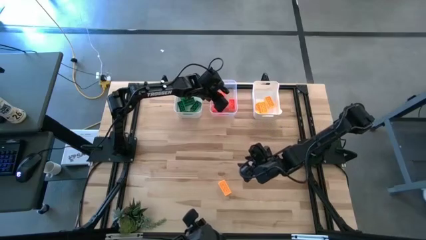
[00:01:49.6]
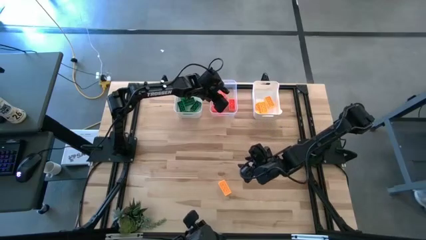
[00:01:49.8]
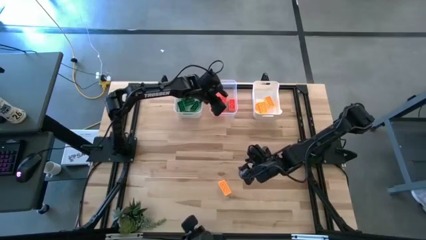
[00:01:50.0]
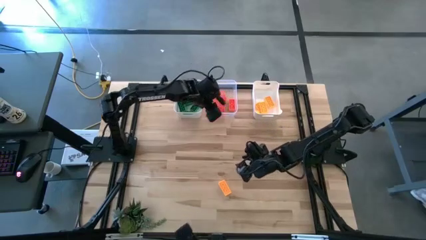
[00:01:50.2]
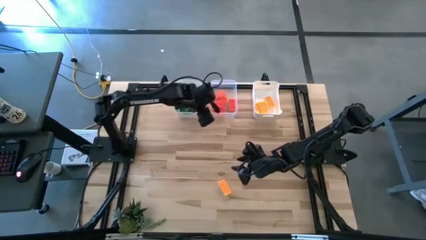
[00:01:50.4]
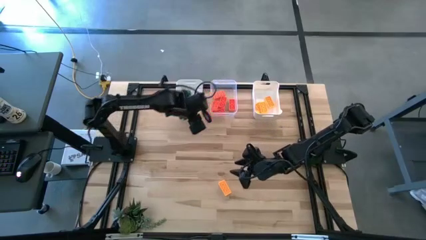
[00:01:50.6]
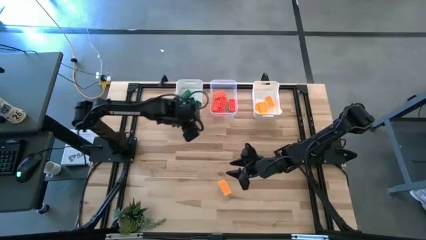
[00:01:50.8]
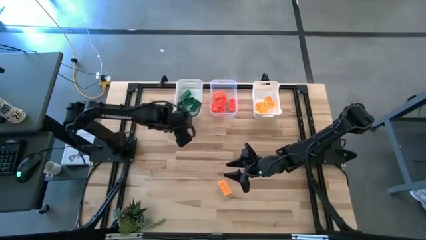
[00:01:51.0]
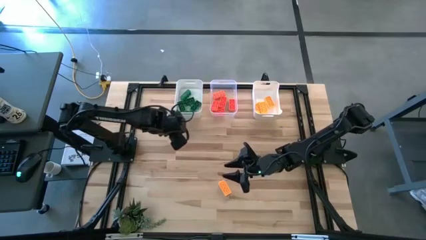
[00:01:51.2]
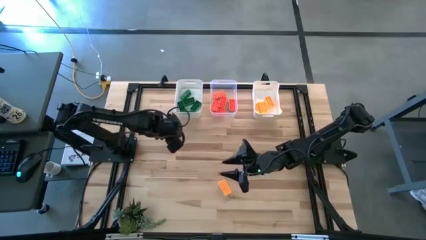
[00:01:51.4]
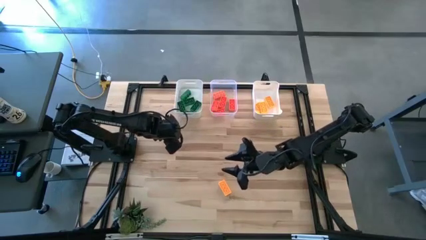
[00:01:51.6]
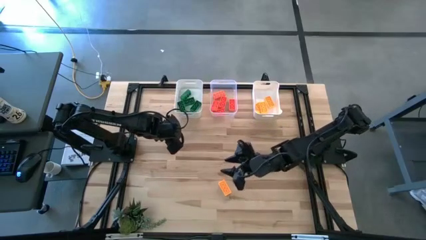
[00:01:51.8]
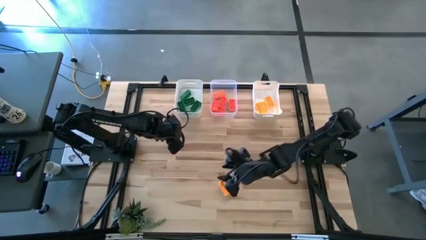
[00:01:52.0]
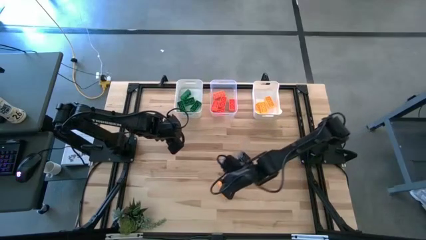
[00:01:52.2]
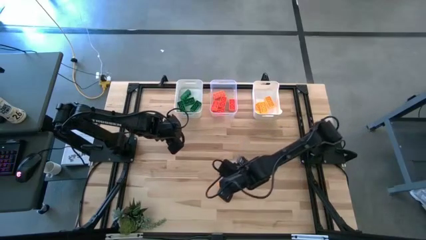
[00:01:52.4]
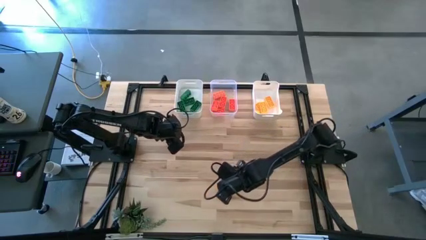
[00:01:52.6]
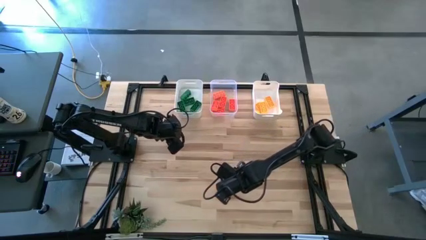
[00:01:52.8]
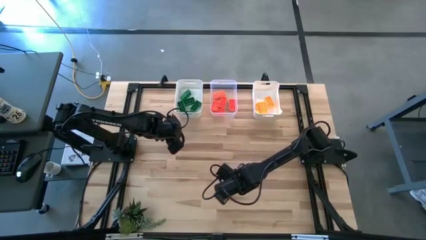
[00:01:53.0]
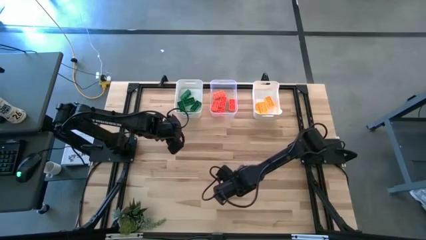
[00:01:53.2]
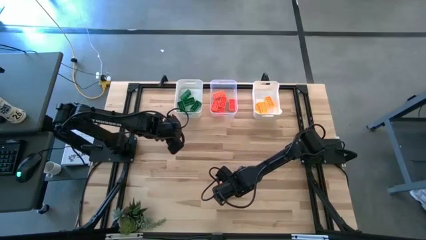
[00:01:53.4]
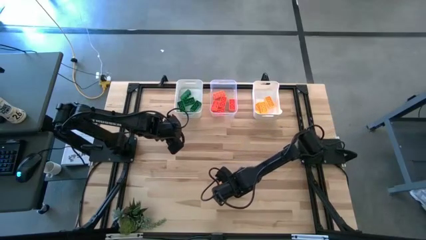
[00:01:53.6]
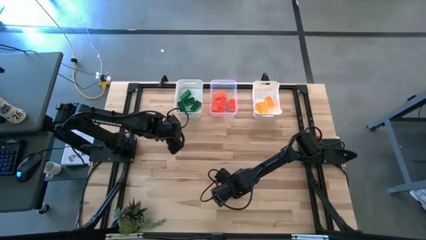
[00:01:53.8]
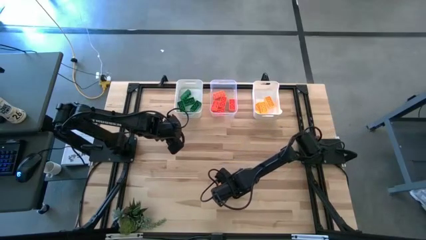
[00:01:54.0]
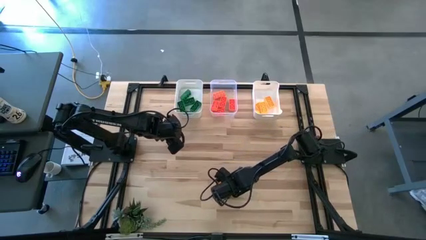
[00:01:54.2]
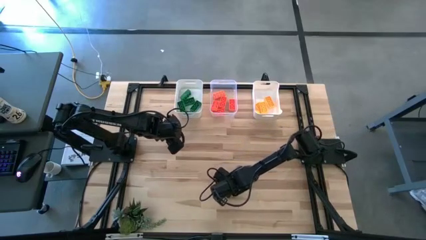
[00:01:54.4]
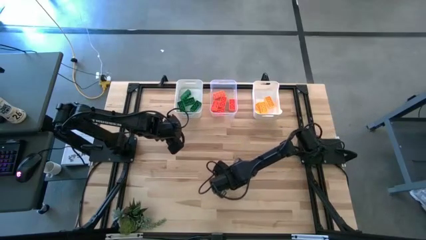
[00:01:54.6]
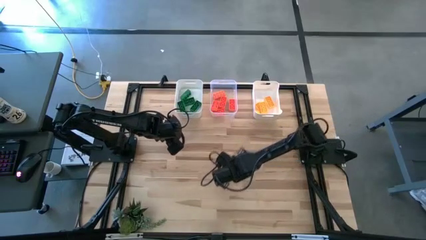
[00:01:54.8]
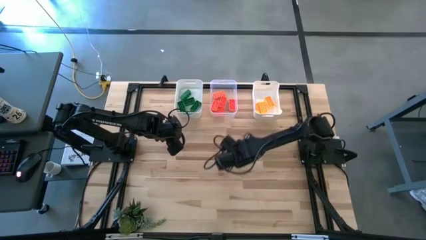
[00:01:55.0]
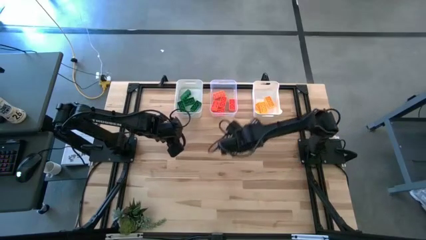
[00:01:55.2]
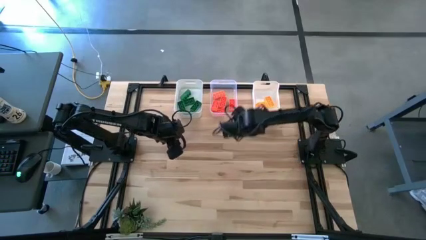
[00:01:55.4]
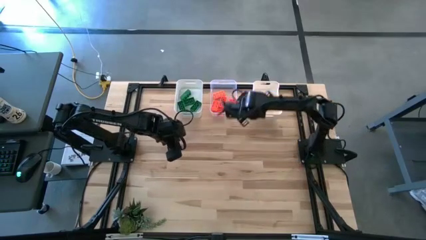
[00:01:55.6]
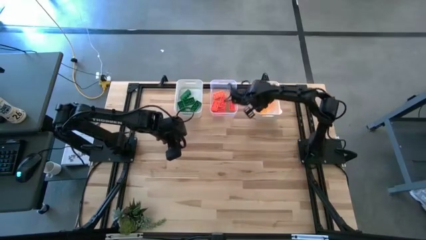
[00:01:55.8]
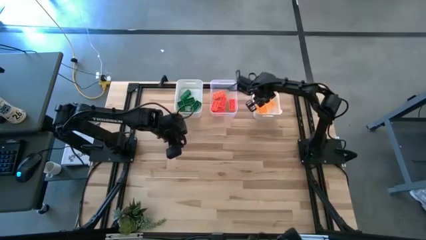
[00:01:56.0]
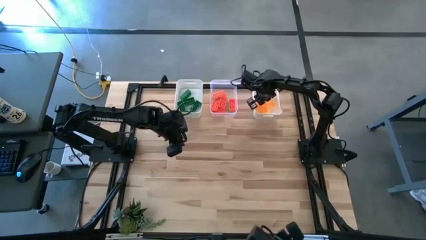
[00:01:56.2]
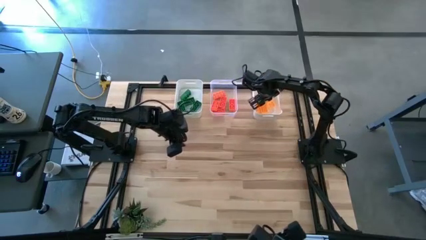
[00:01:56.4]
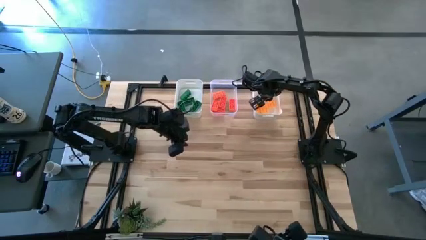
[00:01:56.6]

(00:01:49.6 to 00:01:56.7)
Task: Sort & place blocks by color
Put the yellow game piece into the right white bin

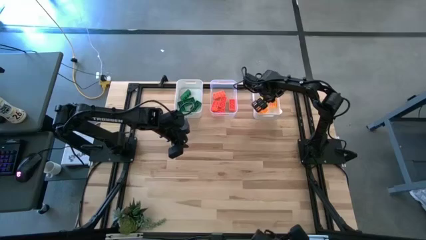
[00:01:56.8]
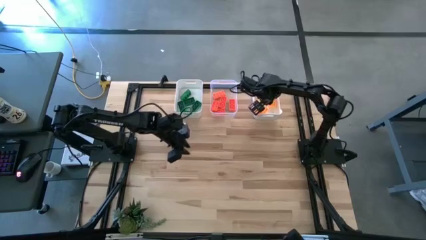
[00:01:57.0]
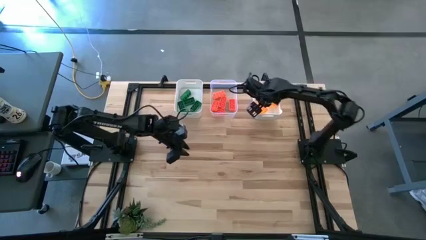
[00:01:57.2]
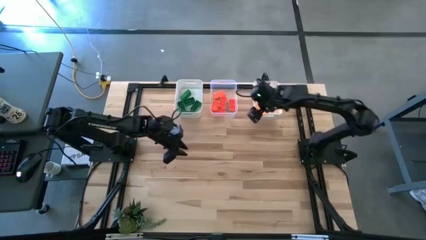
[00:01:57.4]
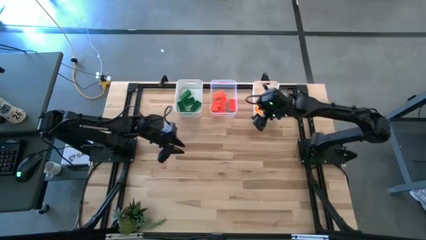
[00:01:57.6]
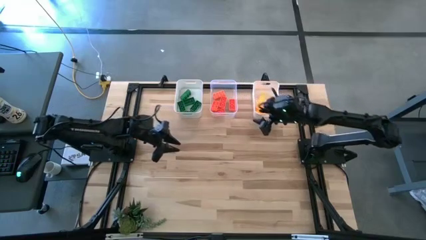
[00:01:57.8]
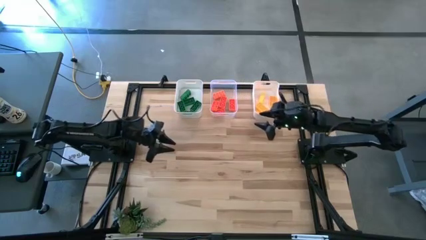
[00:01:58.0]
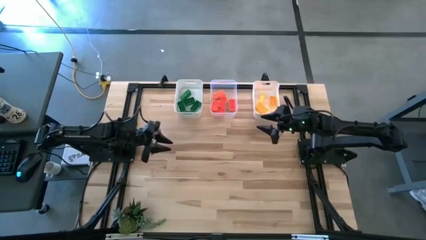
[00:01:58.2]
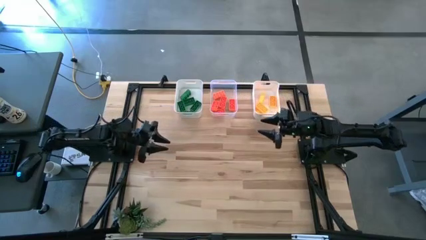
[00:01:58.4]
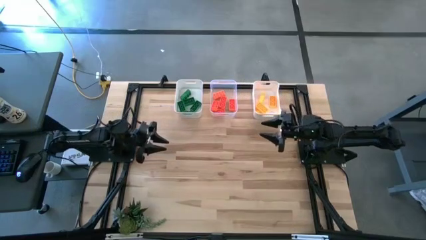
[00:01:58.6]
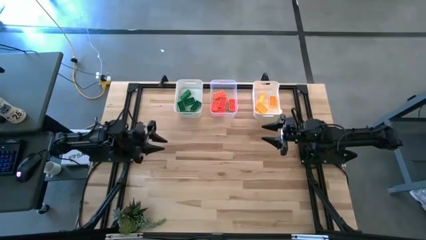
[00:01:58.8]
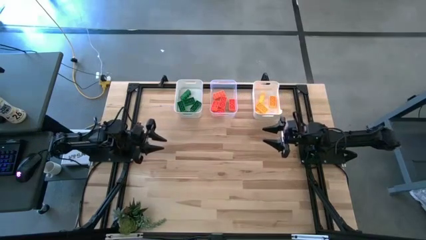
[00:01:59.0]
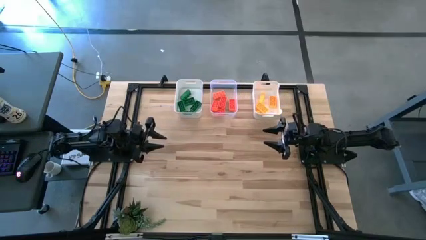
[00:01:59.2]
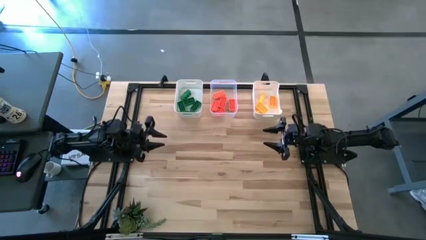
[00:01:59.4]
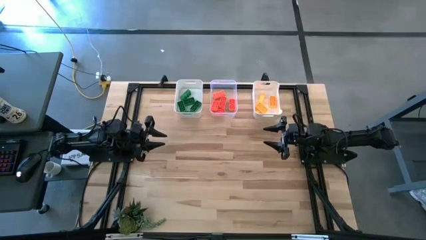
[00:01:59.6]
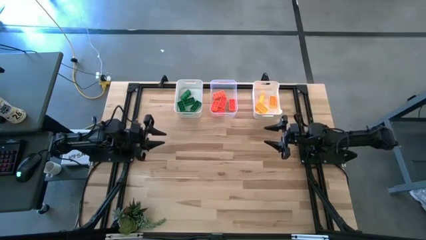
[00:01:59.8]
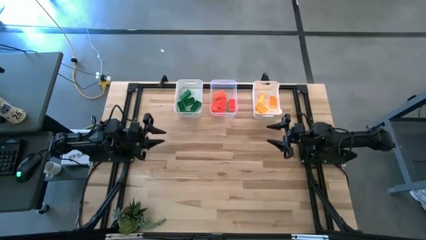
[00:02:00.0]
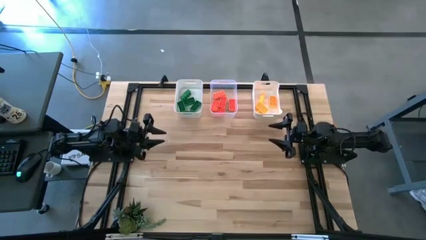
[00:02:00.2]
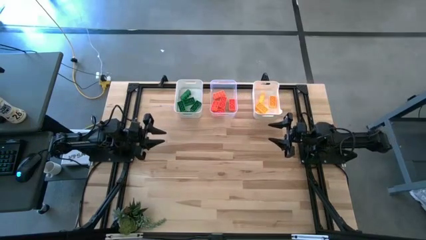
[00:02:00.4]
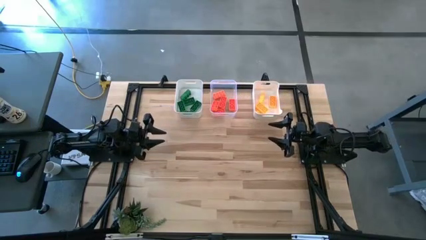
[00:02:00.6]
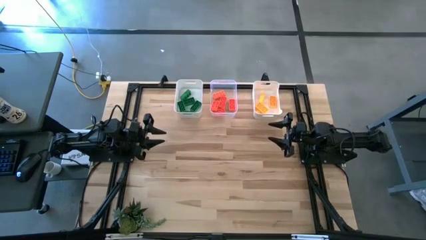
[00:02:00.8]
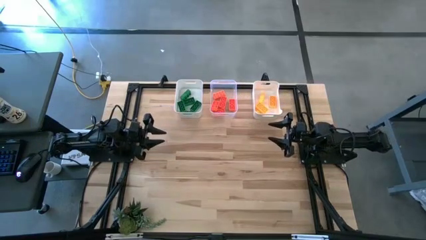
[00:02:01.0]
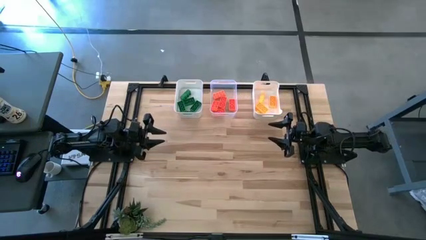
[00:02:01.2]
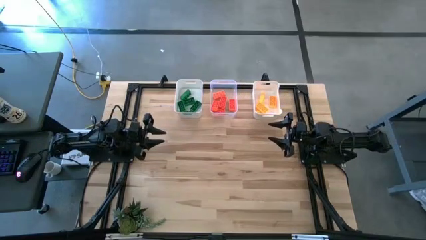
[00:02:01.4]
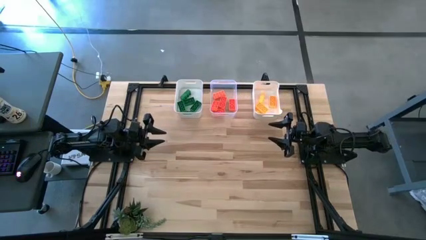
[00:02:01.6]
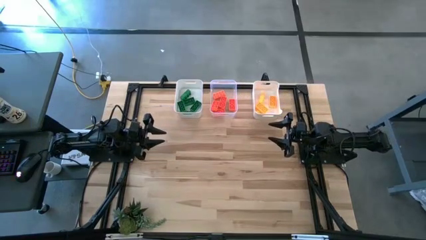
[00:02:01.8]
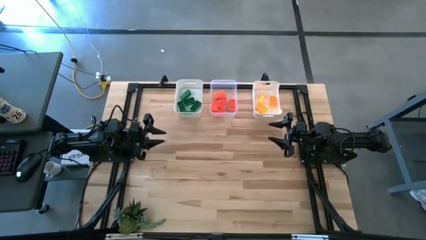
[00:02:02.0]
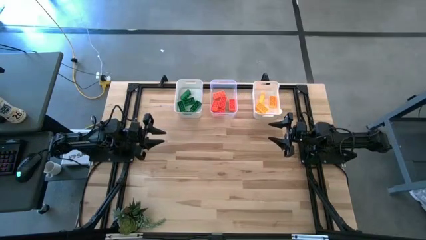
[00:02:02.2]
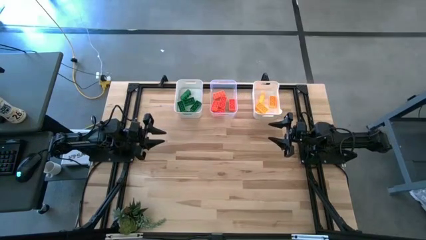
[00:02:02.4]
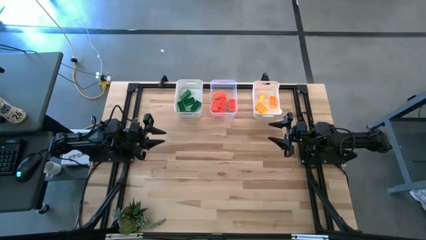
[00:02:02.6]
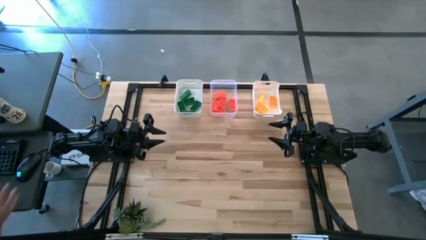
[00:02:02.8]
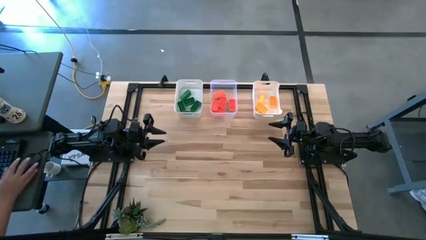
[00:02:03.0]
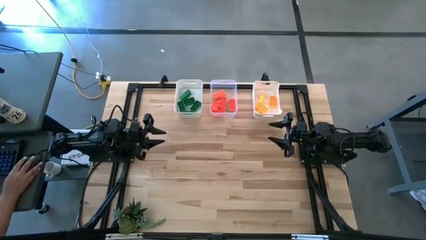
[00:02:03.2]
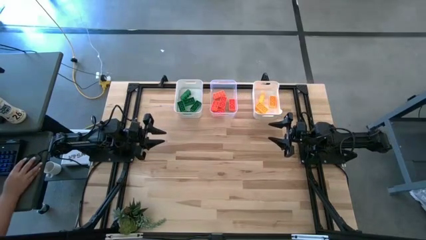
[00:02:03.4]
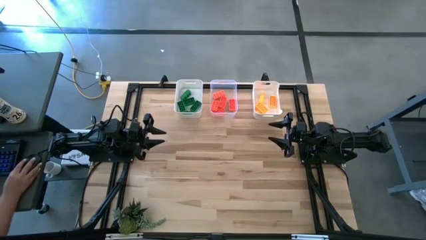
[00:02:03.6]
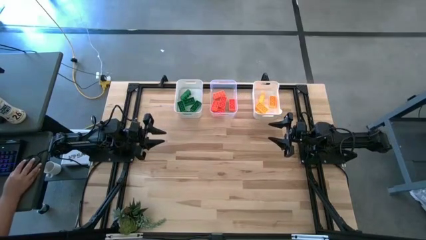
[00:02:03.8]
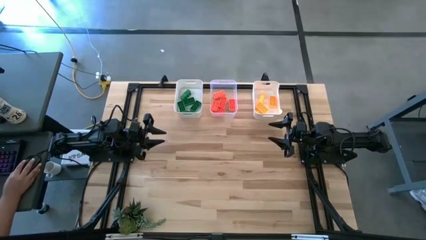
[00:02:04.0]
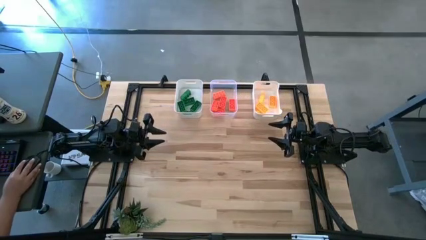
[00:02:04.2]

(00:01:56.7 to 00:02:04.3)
Return to Home Position

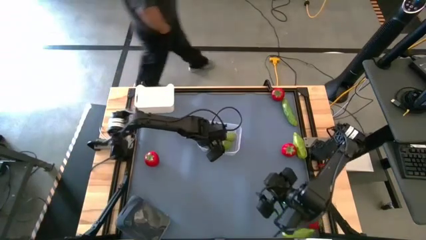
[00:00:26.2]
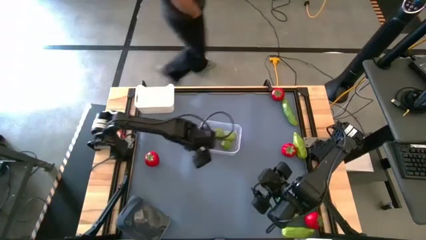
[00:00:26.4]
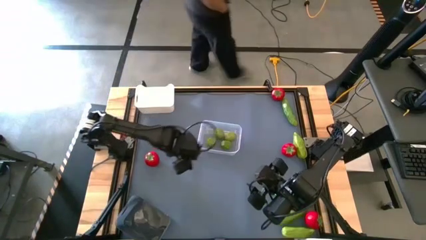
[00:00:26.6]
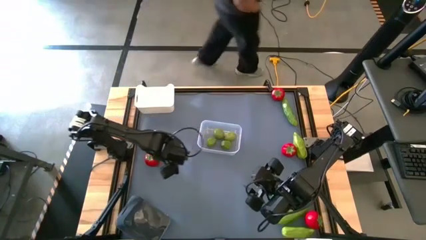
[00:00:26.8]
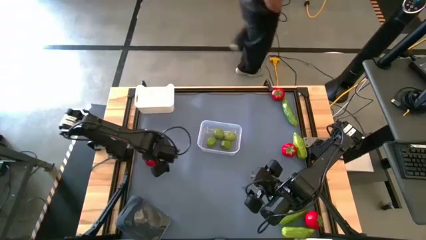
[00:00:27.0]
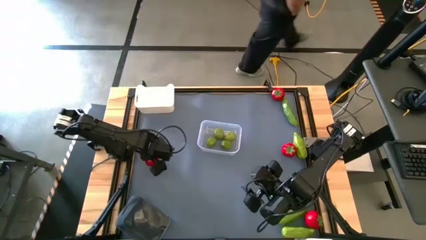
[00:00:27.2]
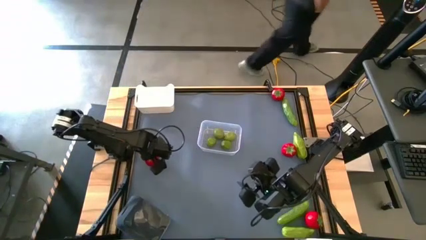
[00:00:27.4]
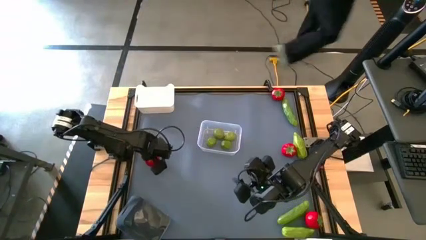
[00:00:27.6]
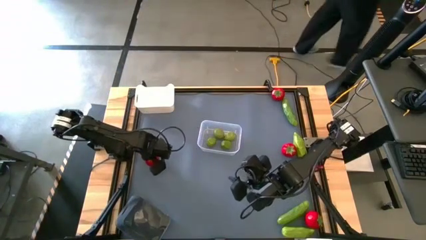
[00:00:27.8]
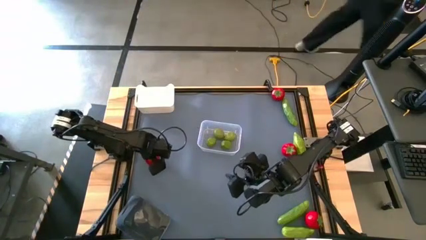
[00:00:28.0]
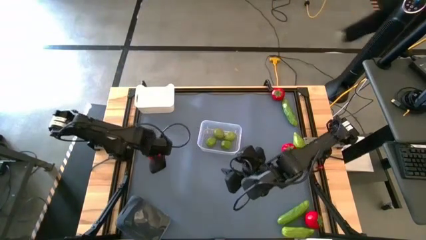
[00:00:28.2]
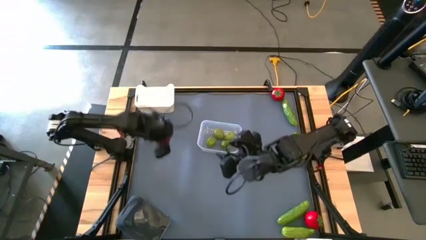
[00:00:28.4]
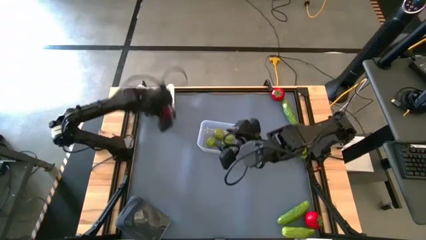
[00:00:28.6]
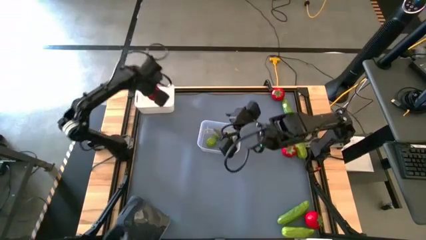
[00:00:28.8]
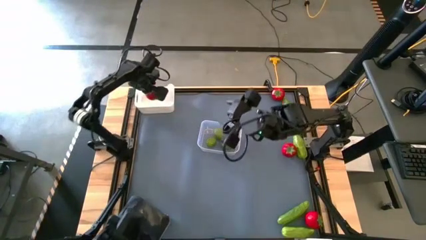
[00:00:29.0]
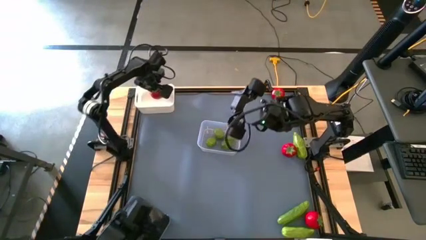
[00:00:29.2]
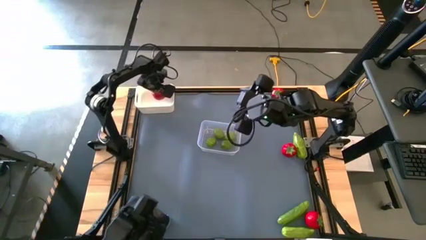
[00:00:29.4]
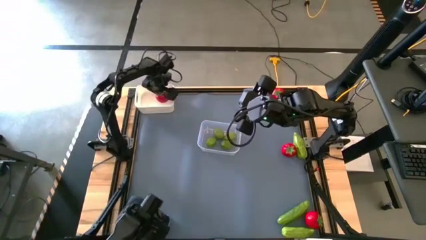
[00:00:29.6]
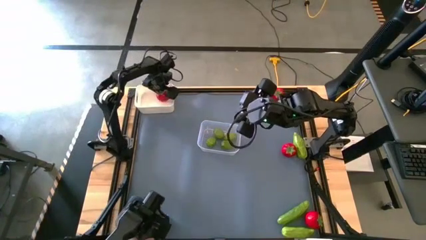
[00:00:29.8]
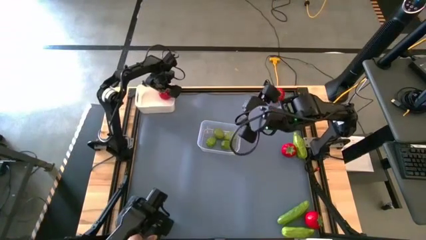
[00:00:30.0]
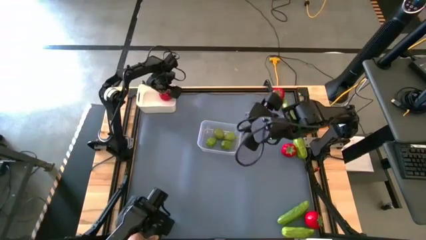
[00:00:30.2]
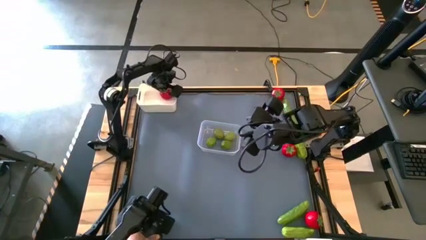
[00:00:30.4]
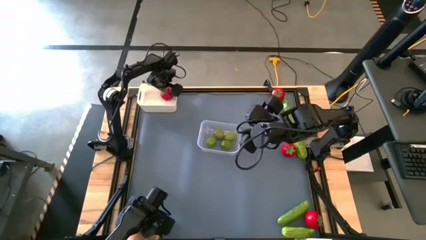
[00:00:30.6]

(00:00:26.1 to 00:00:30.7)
Task: Sort produce into baskets
Put the middle left tomato into the white bin
